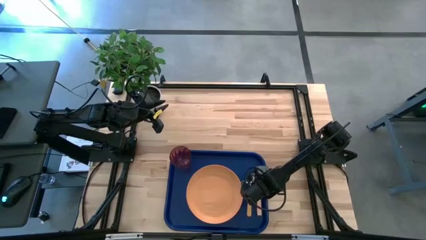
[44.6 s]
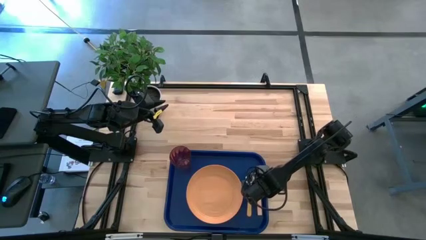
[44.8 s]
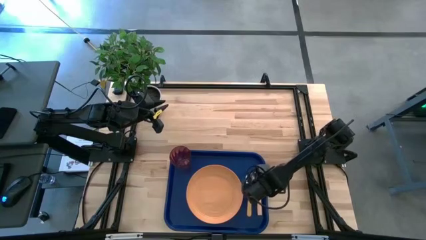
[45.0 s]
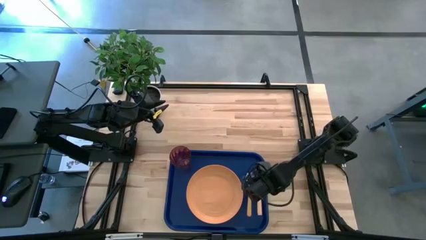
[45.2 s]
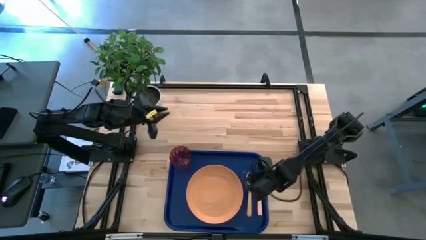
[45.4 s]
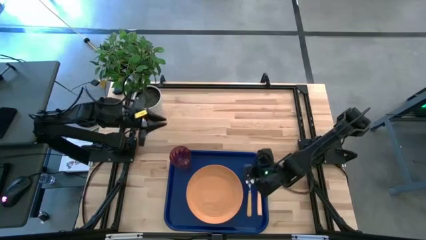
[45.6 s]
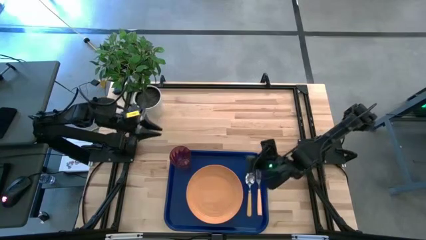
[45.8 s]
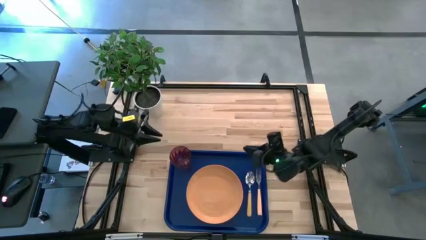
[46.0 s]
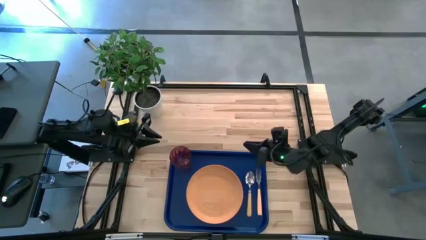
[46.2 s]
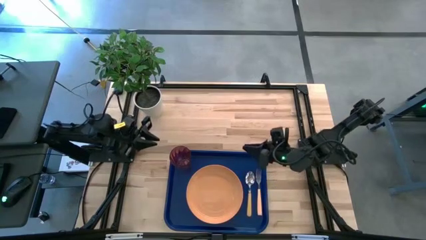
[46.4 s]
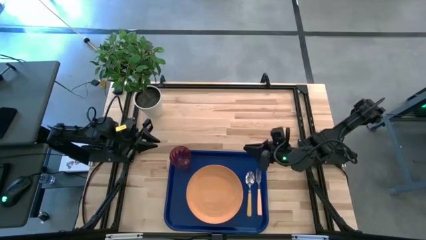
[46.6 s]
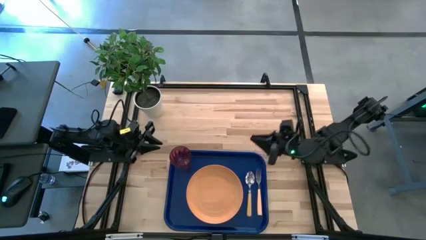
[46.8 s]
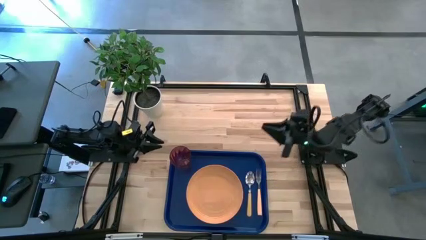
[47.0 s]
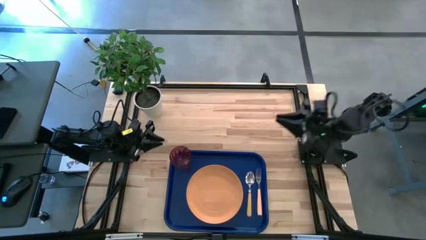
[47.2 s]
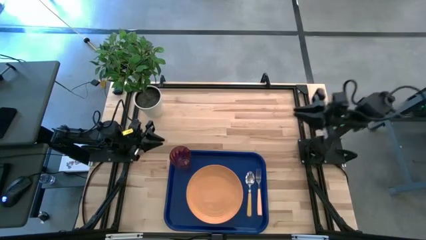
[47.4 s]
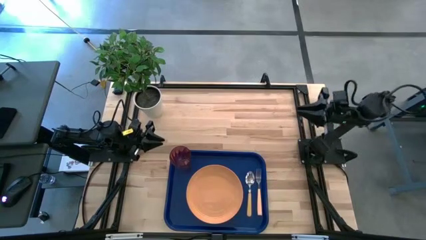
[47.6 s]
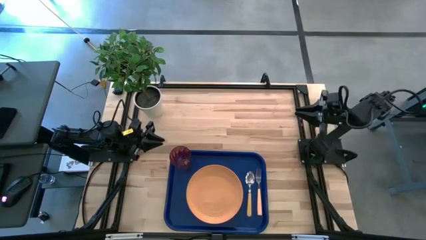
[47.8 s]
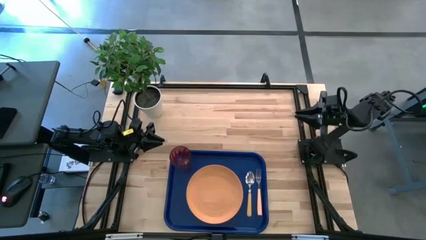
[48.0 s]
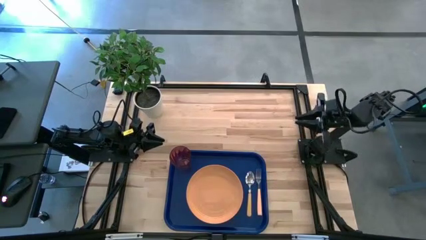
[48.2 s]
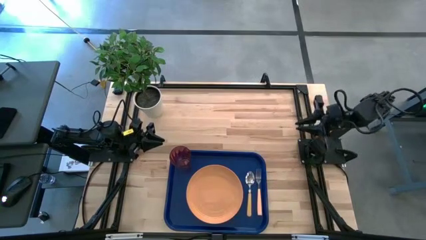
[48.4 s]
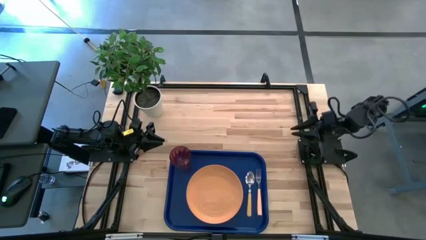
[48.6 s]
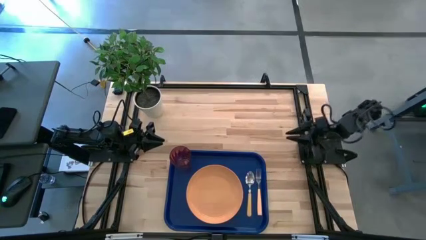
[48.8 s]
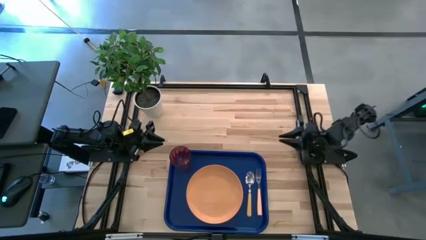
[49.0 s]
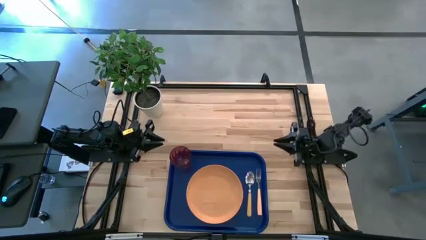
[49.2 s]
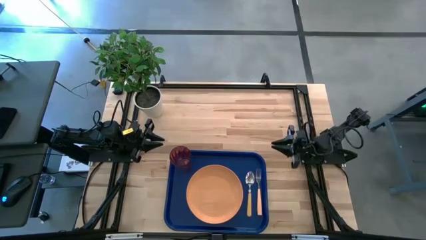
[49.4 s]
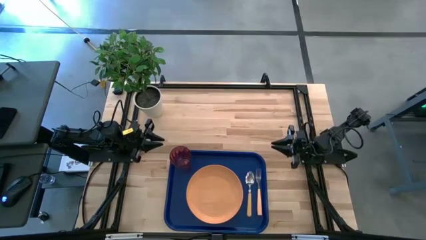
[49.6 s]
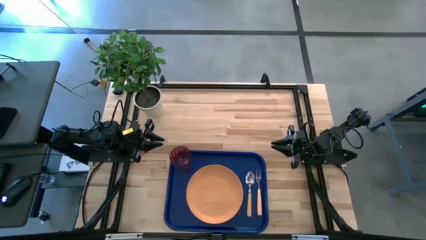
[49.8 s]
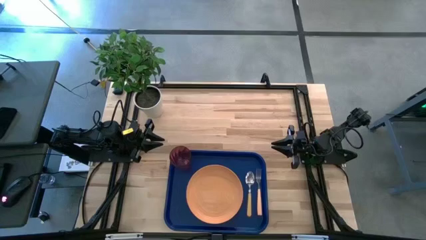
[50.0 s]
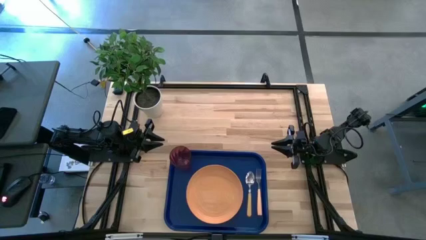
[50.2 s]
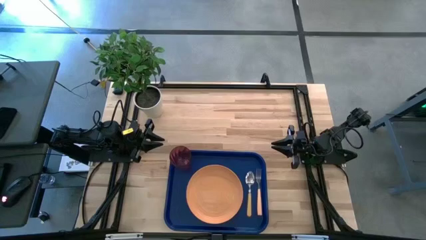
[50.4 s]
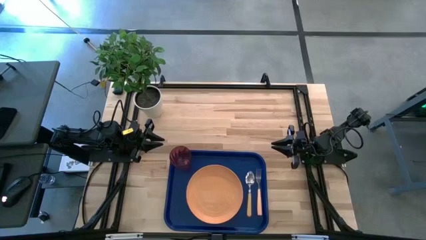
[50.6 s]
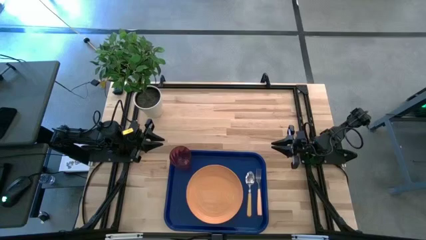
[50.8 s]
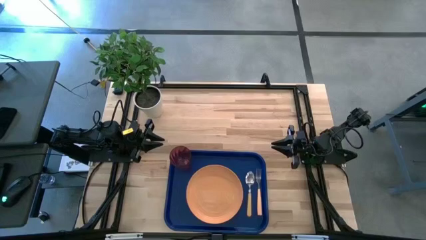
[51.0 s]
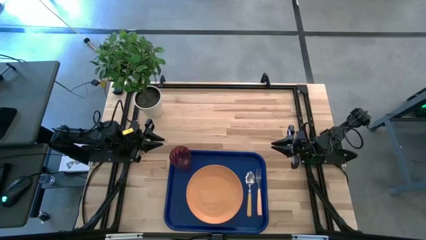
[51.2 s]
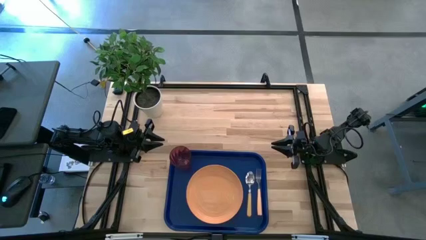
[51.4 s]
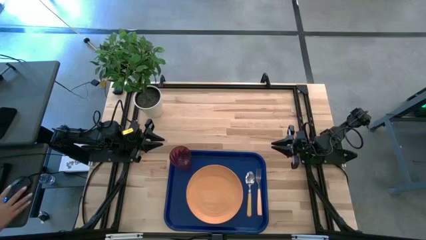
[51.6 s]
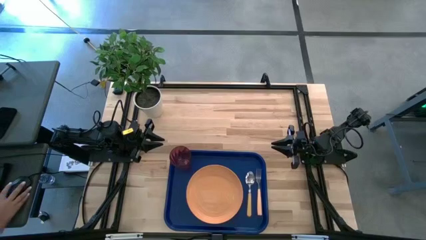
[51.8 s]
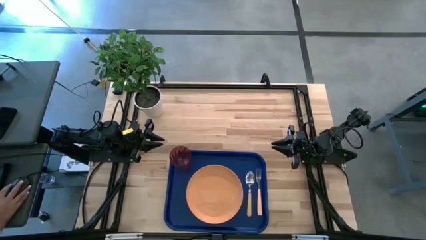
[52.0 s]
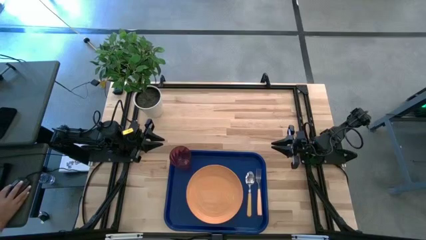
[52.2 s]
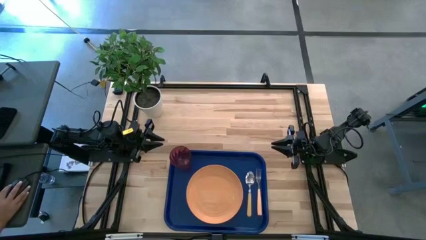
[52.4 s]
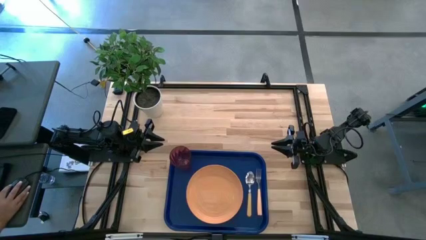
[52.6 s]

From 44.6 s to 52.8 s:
Task: Pick and place plate/cup/fork/spoon on tray
Return to Home Position

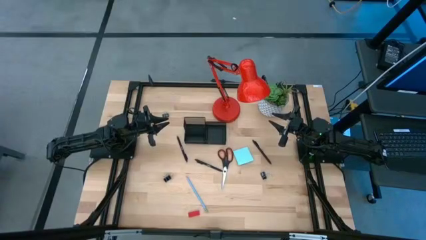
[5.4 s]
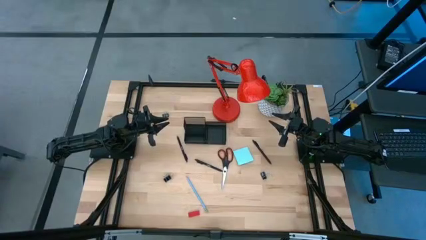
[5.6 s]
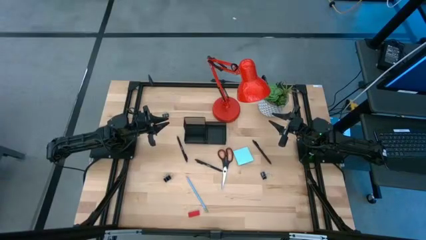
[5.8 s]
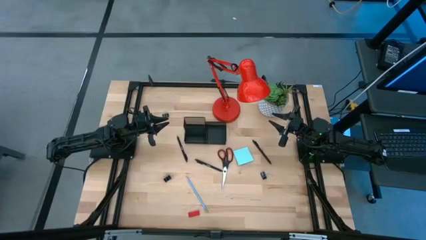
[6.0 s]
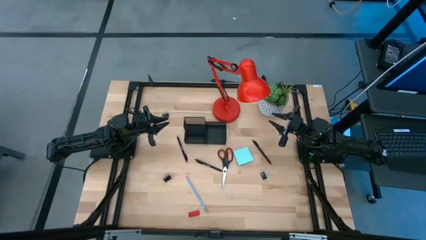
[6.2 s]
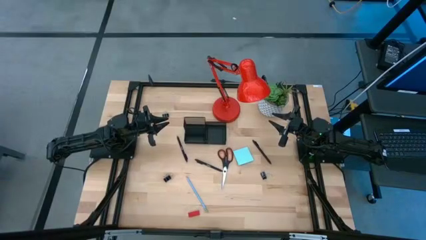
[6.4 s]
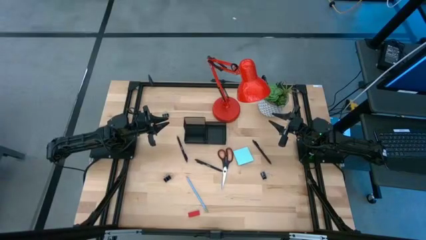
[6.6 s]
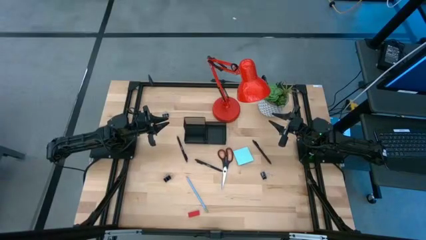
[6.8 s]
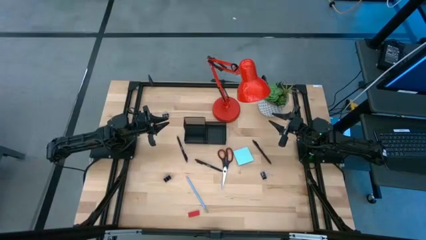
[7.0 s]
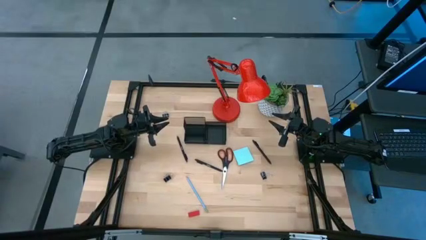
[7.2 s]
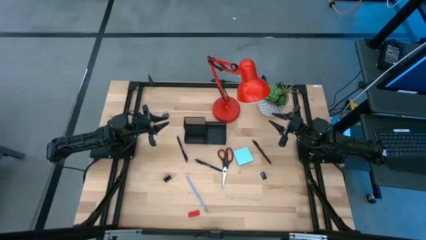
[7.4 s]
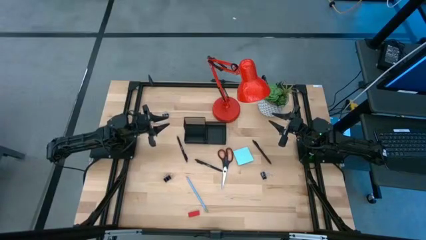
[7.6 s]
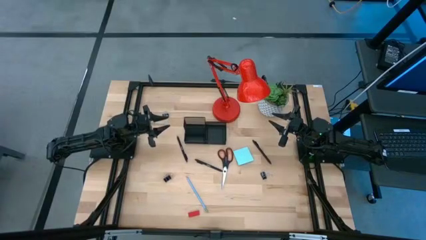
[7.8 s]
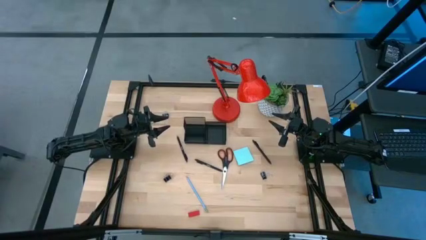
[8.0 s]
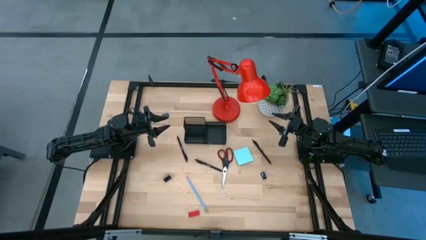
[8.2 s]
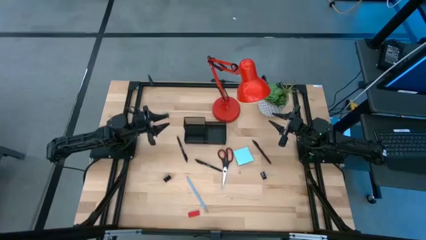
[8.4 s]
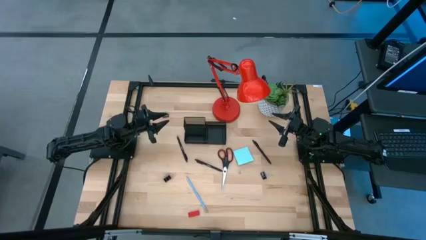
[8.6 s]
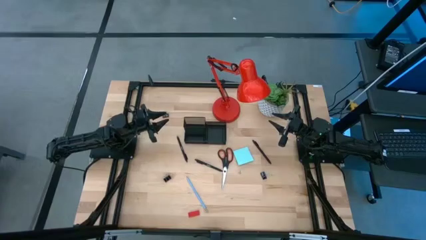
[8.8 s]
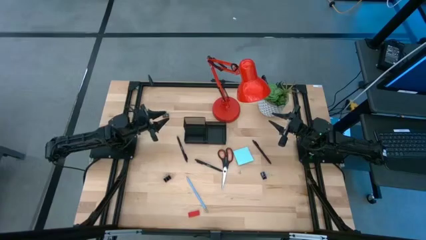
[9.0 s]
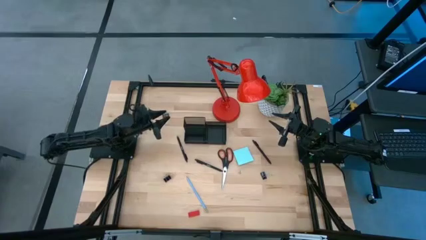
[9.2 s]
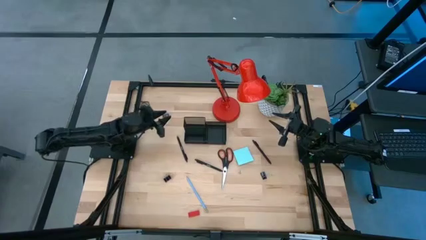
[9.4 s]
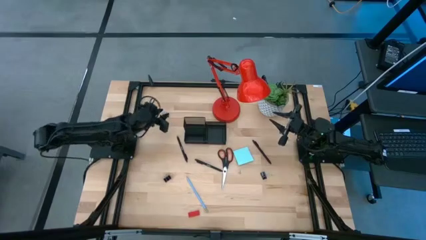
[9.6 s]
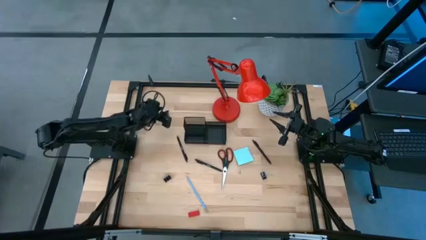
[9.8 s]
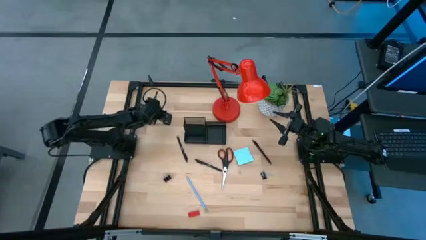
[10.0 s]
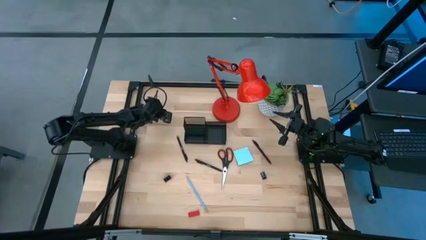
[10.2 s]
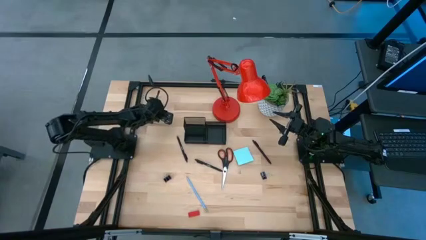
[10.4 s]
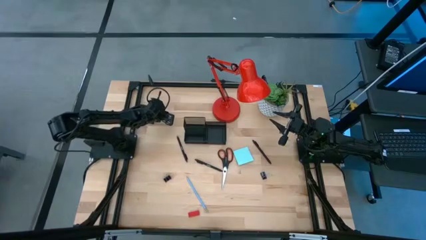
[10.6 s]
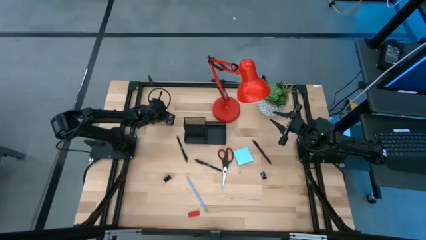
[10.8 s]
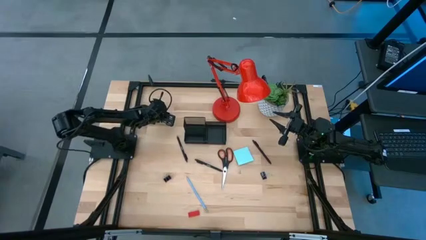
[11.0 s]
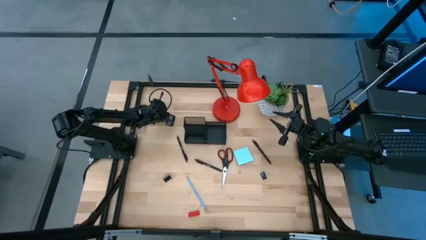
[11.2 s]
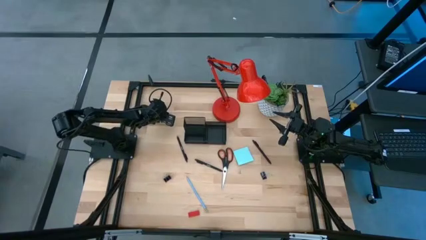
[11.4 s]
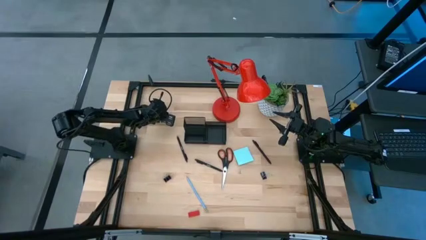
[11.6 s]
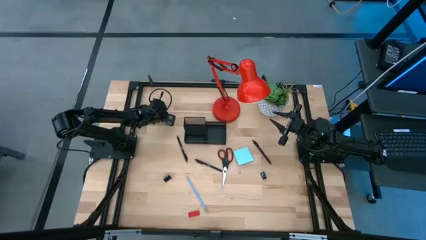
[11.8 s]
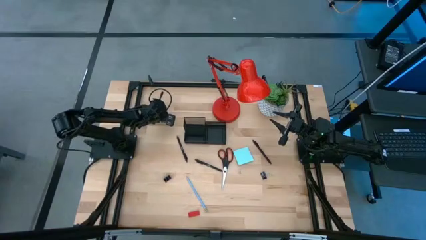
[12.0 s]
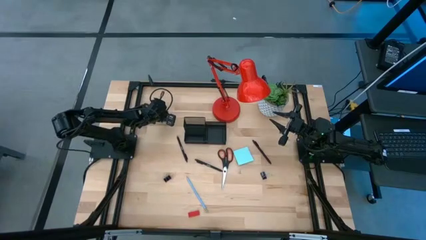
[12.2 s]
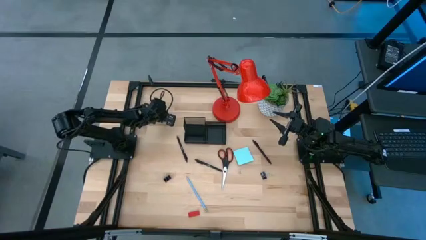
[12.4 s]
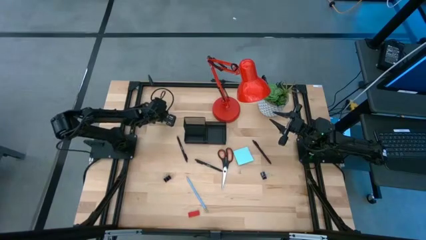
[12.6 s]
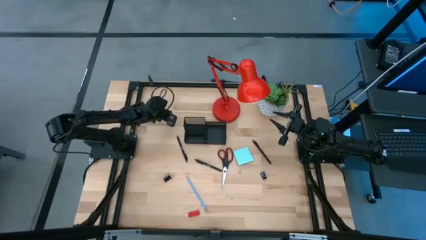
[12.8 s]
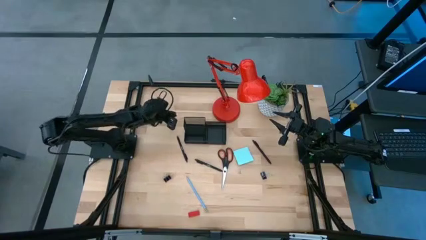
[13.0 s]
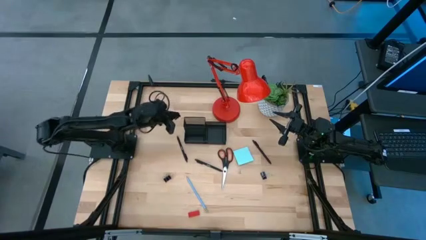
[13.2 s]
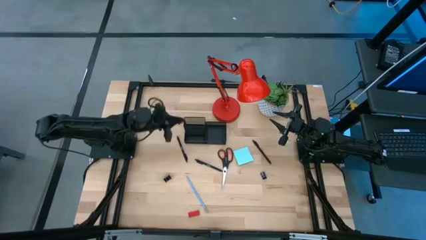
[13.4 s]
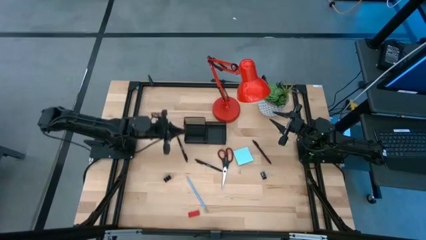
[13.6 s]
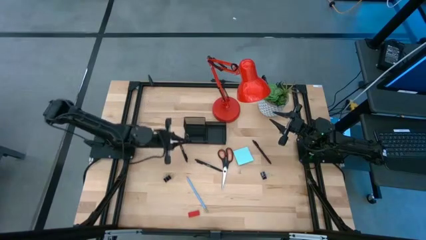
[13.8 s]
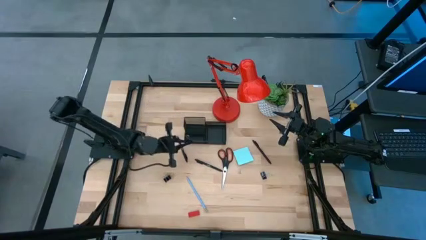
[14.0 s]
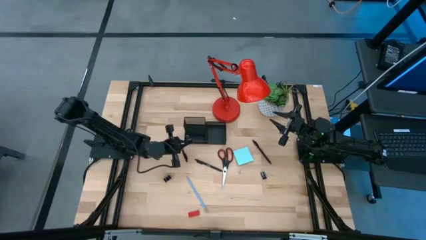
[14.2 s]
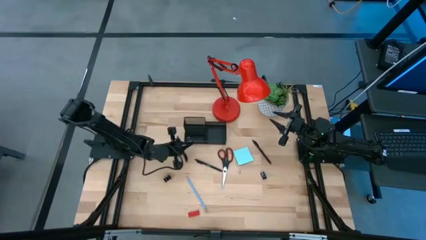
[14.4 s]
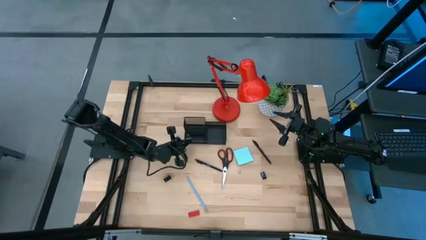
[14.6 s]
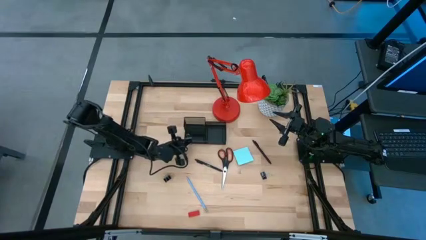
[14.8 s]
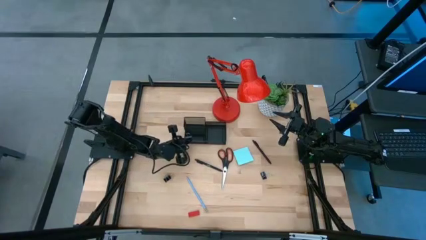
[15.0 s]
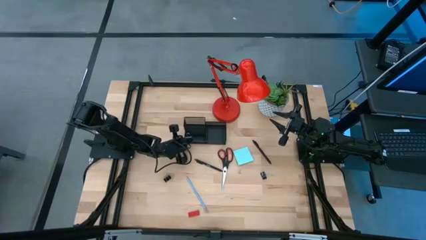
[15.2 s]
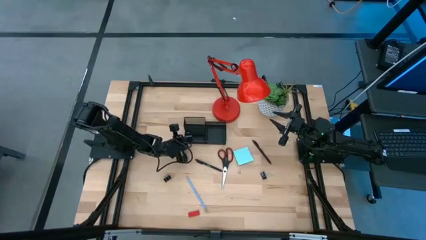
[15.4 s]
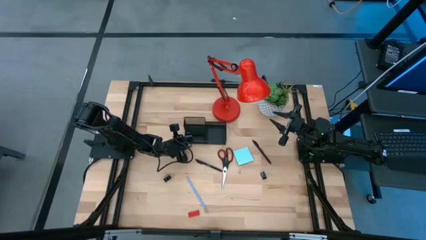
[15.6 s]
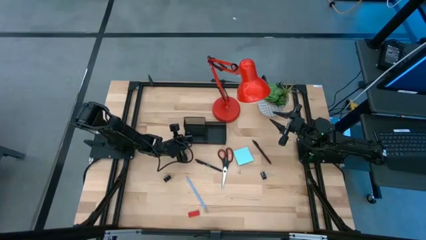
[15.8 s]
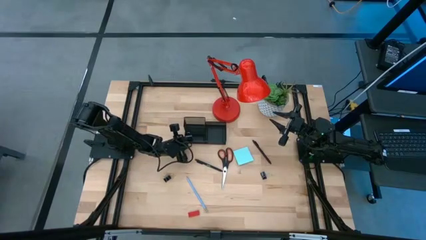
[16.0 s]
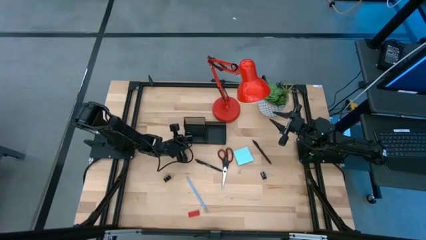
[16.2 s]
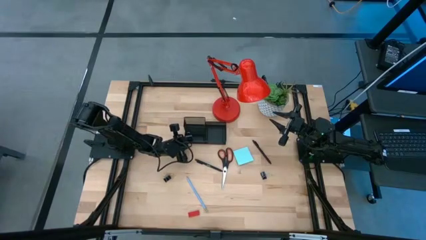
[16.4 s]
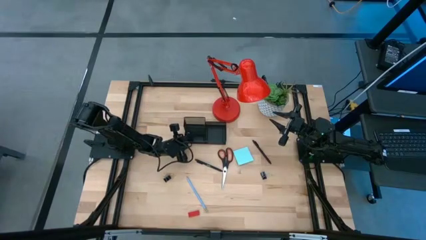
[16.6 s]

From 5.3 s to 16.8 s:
Task: Pick and place office supplies into organizer
Put the top black binder clip into the black desk organizer
